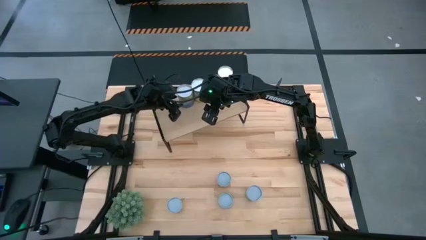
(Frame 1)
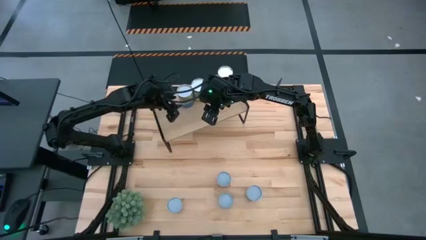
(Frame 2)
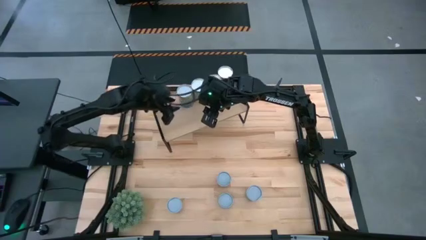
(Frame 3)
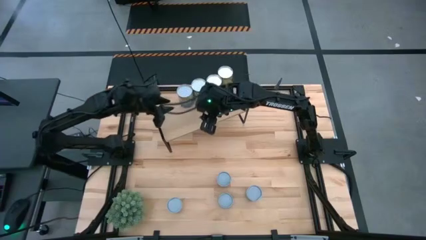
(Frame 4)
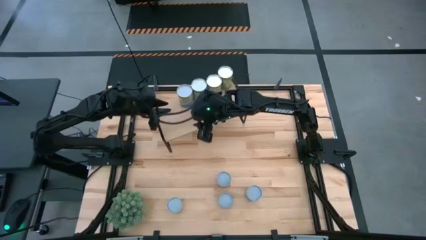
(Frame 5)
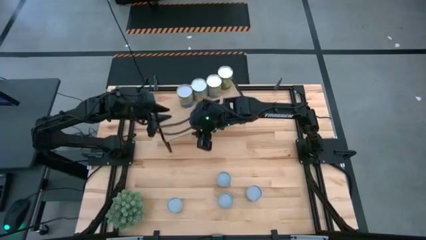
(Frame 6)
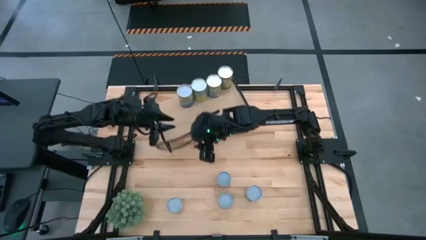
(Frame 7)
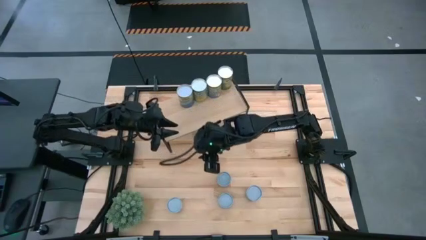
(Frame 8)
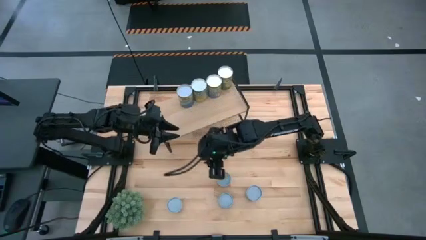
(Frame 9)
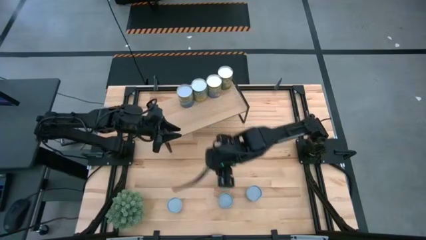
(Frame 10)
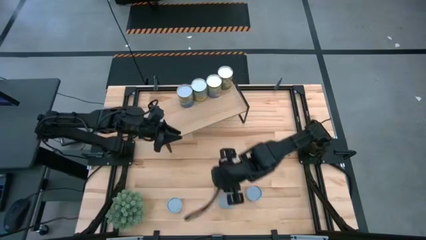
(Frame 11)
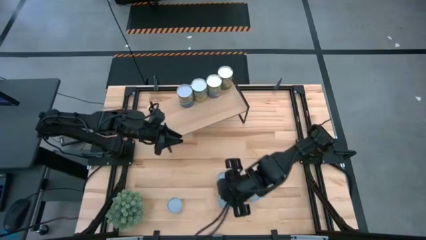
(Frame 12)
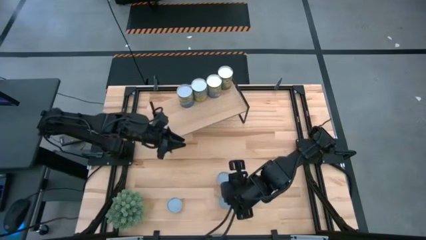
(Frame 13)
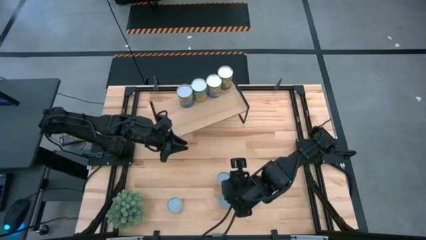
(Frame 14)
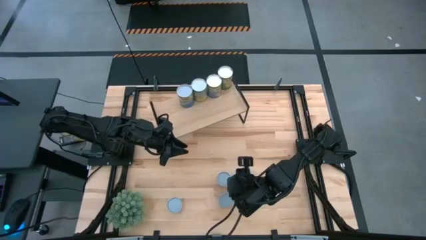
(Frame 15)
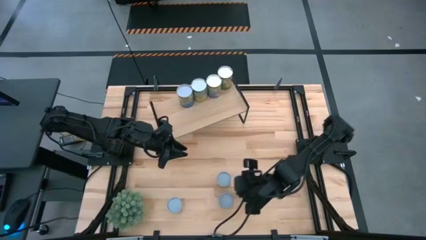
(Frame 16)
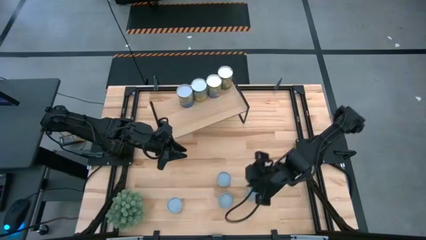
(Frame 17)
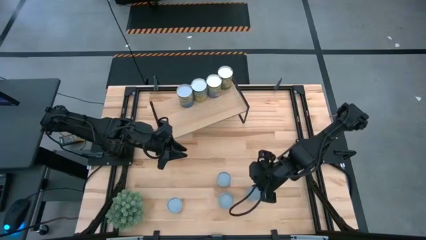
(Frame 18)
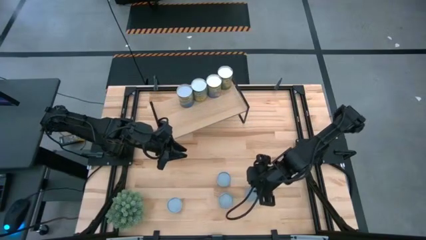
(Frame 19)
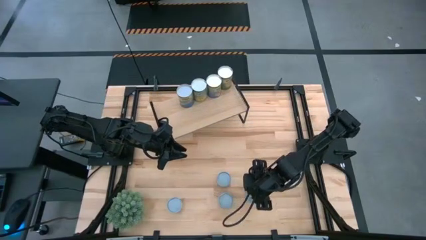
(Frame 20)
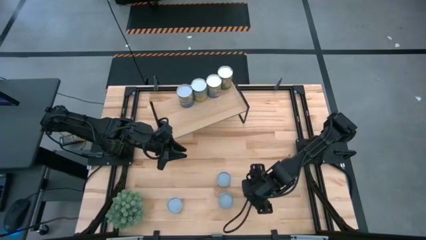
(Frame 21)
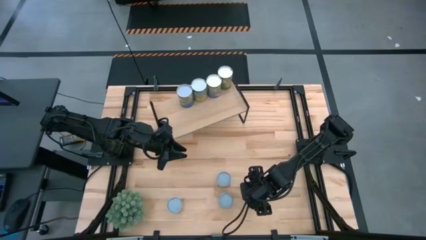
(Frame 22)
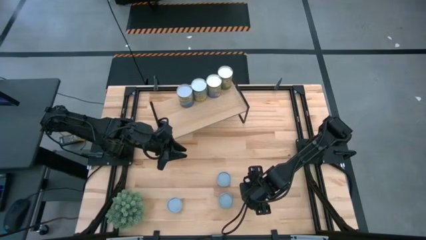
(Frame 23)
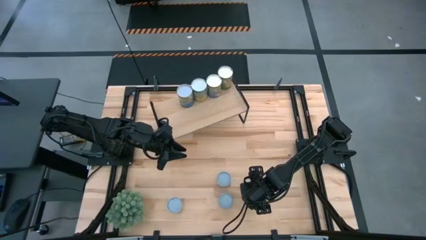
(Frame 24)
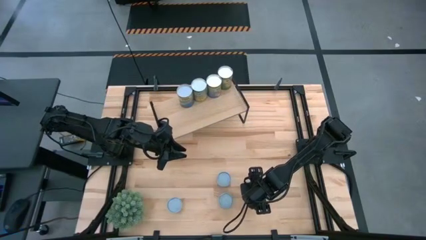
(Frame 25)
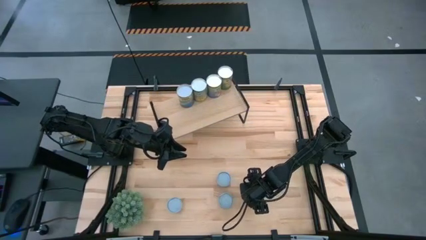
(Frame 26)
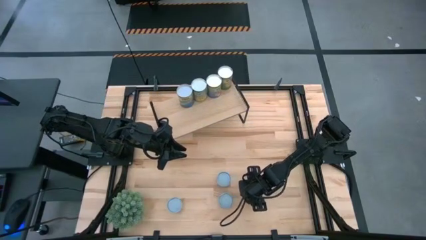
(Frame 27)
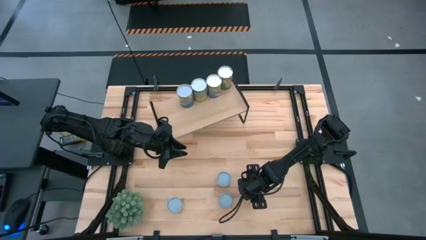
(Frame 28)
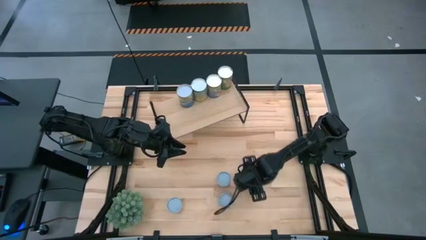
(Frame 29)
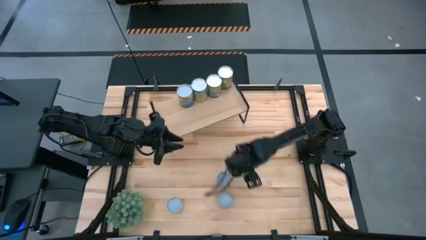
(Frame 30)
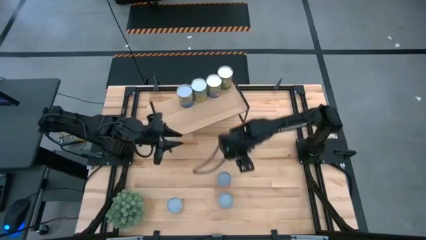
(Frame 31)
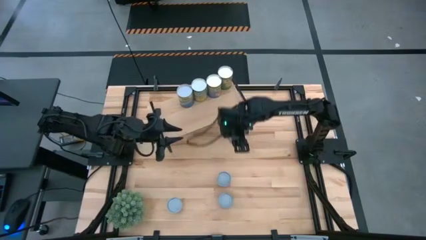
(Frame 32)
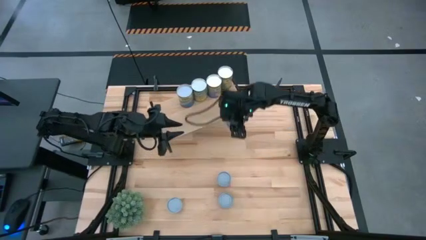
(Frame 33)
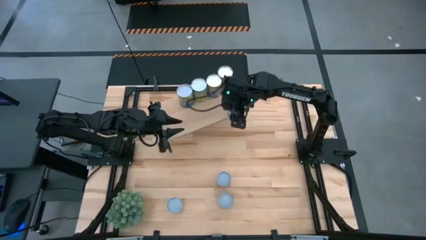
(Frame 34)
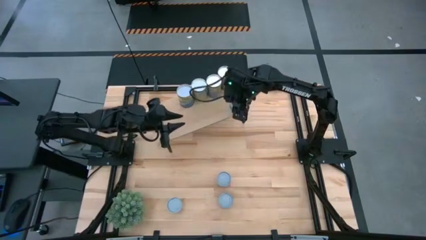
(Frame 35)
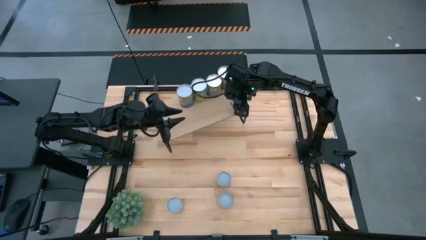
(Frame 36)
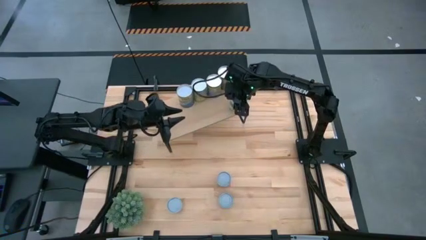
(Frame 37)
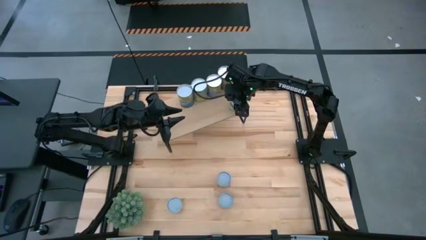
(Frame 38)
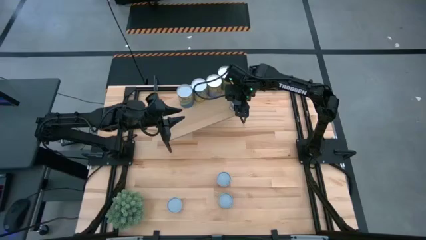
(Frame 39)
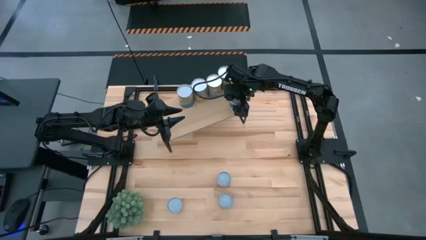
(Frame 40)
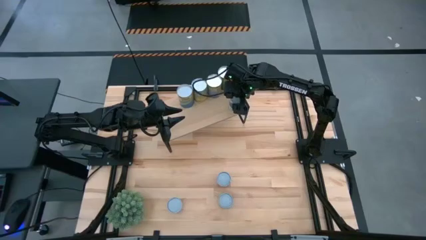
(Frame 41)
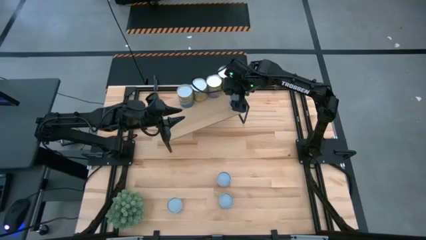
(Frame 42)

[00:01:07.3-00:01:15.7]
Task: Pick and place cans onto a shelf
Put the canned mixed vegetables on the shelf

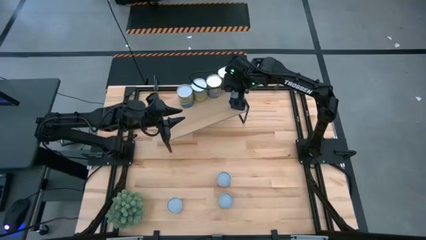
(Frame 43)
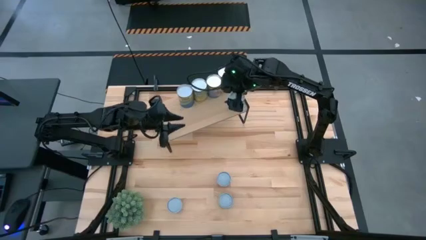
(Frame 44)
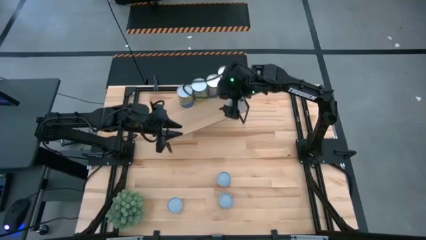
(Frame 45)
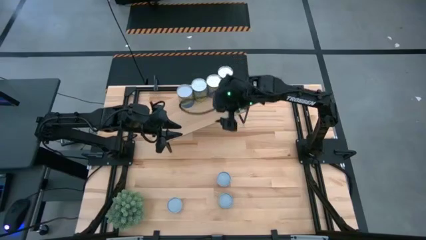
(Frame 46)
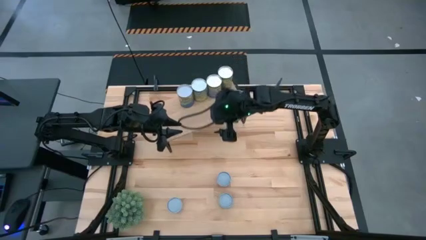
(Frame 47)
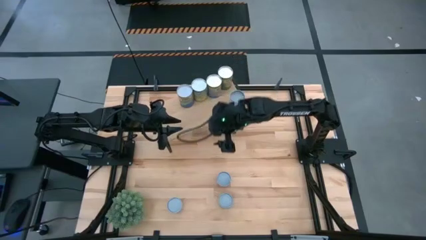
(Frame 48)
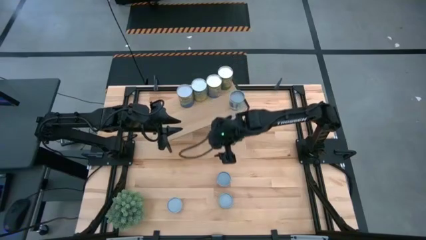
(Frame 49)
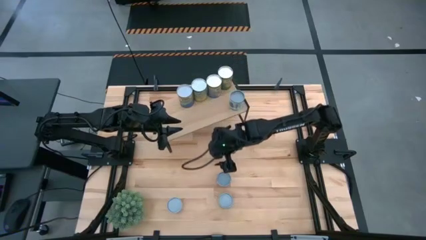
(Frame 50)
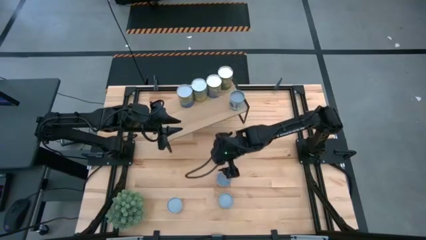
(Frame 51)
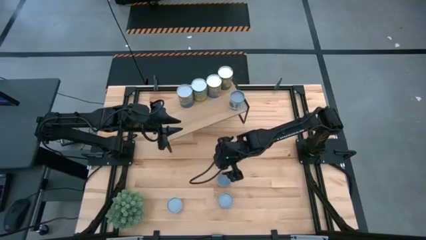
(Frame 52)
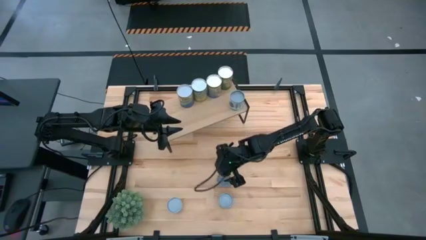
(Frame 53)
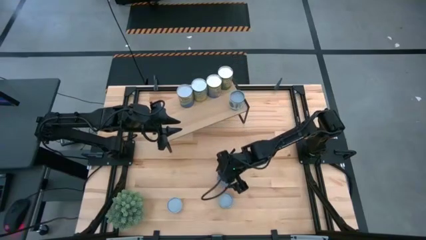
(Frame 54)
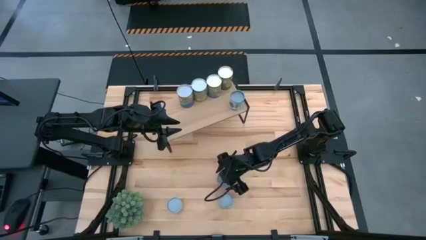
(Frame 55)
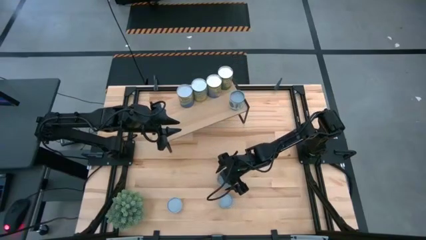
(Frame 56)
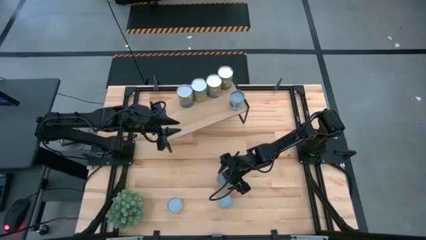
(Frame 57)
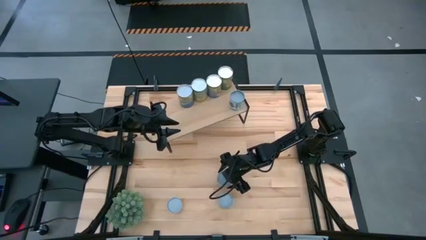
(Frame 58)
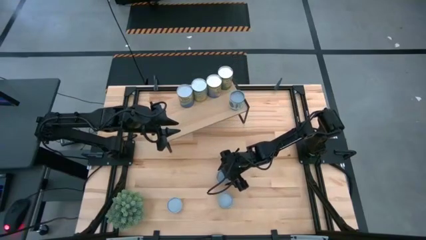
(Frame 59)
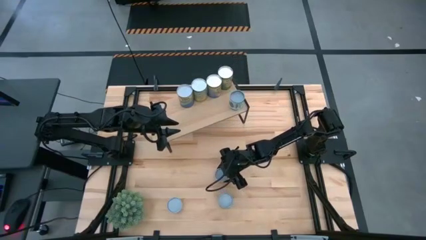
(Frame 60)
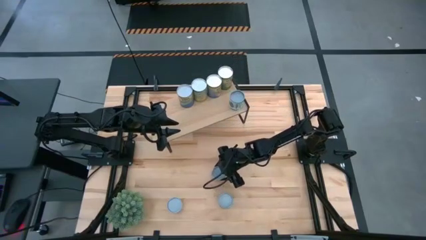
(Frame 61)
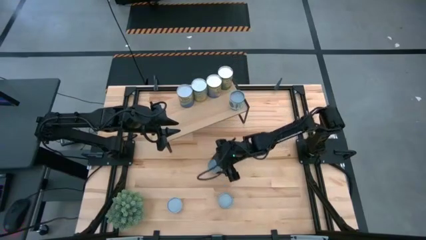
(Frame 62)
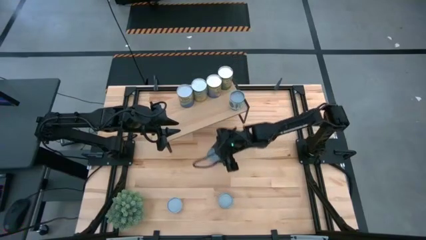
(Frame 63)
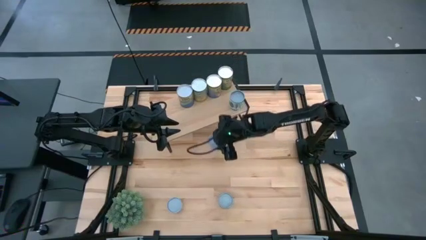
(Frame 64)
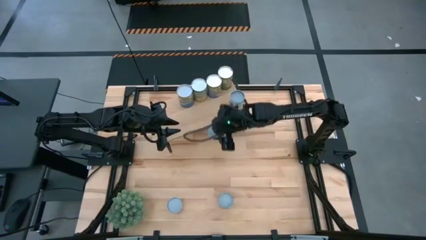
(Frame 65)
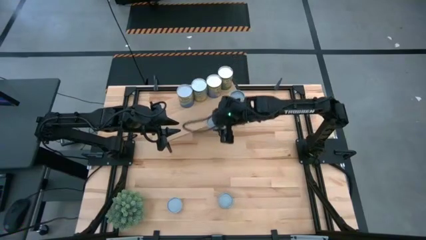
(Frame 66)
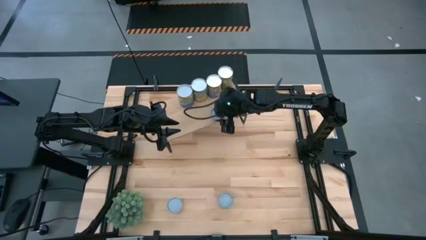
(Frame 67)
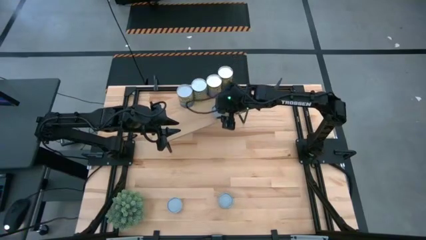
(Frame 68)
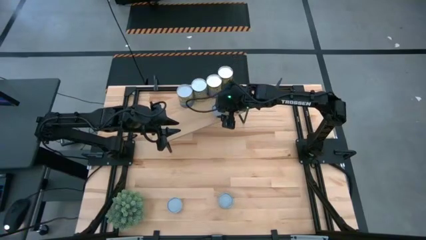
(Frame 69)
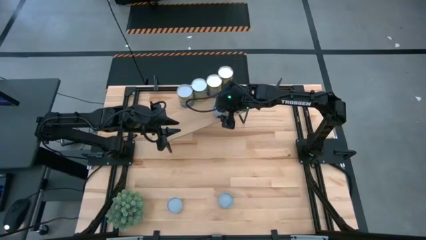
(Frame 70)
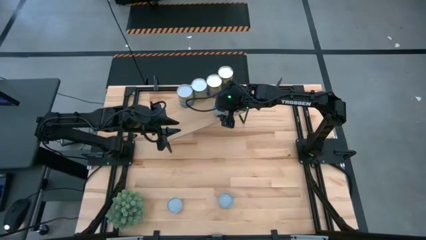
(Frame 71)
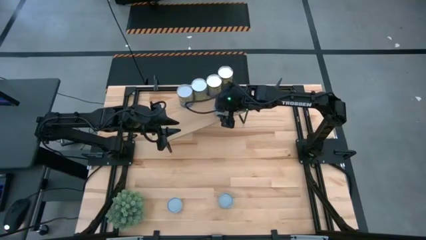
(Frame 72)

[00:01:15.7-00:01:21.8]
Put the canned diced tomatoes on the shelf
